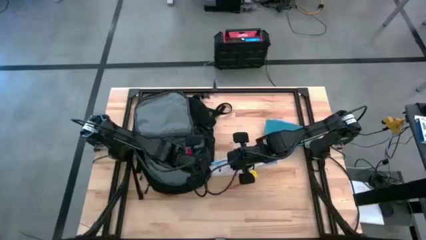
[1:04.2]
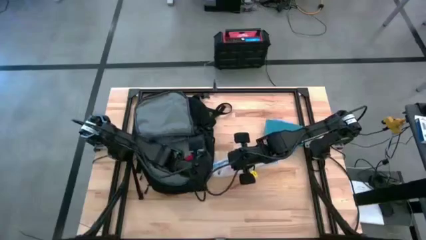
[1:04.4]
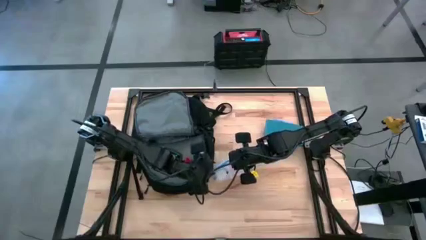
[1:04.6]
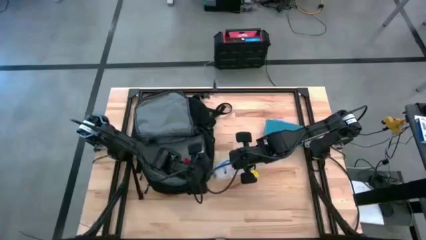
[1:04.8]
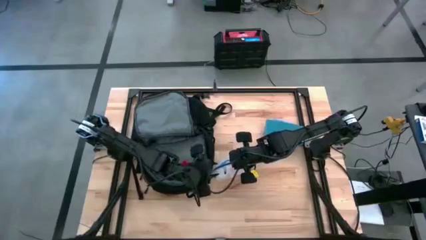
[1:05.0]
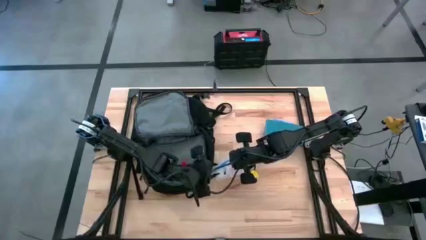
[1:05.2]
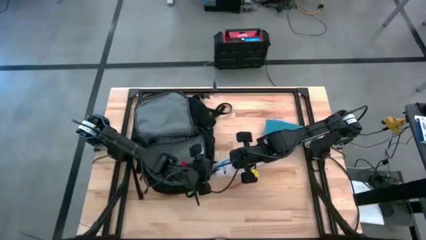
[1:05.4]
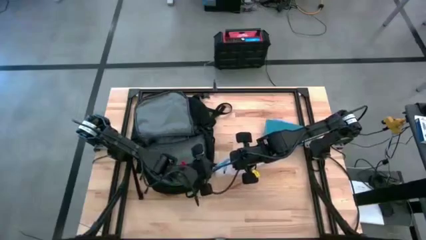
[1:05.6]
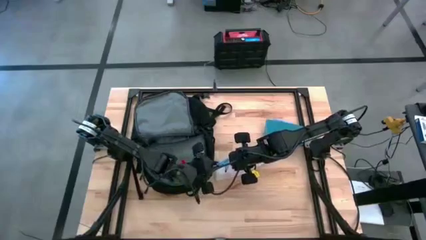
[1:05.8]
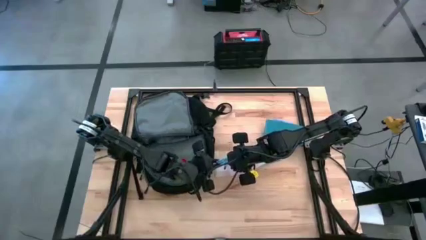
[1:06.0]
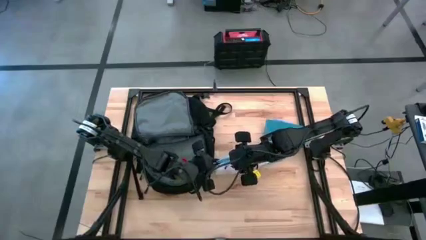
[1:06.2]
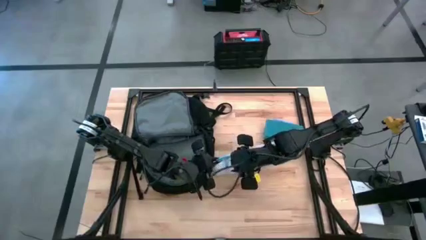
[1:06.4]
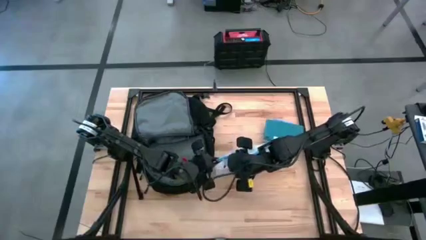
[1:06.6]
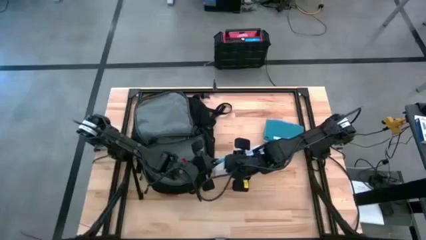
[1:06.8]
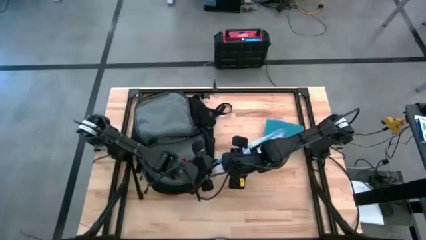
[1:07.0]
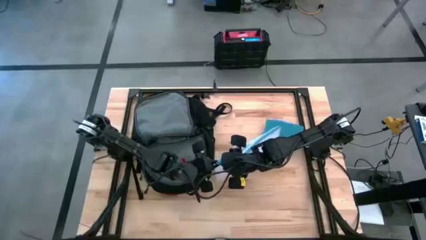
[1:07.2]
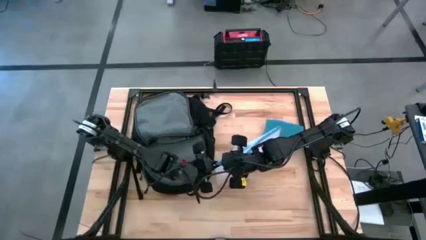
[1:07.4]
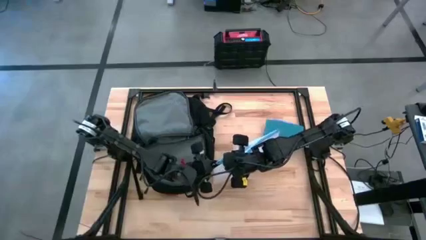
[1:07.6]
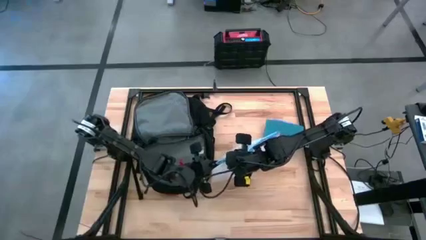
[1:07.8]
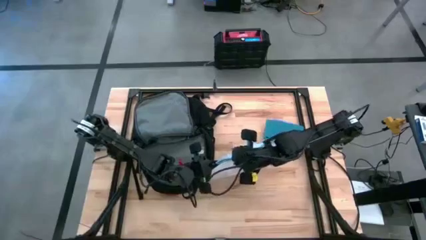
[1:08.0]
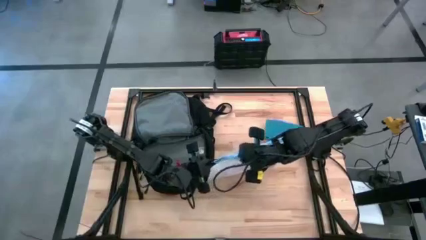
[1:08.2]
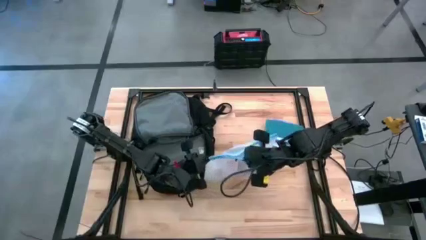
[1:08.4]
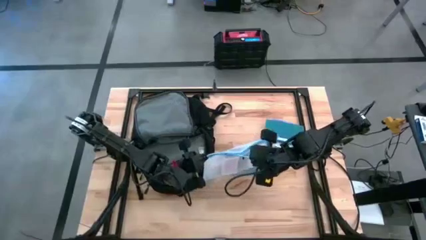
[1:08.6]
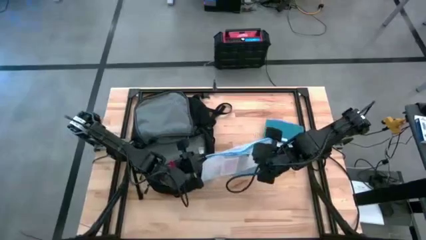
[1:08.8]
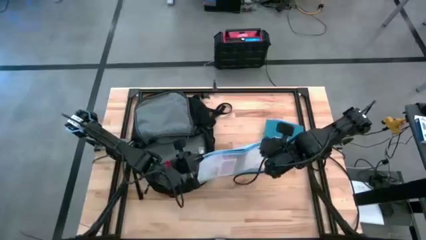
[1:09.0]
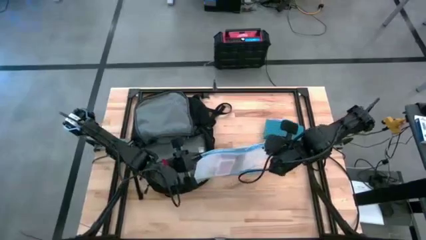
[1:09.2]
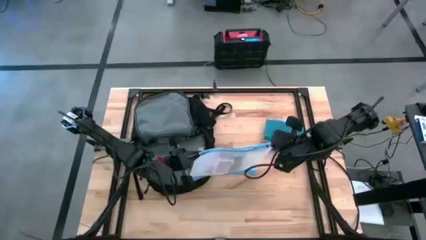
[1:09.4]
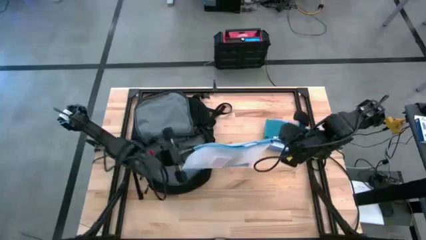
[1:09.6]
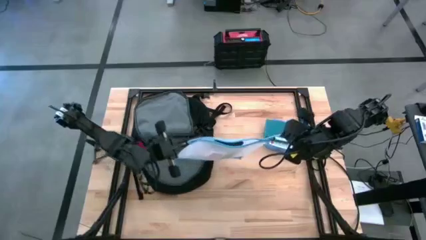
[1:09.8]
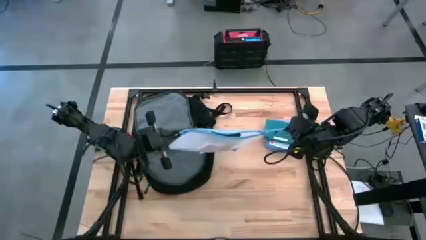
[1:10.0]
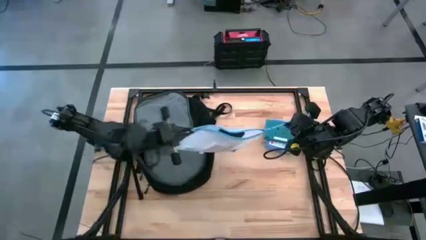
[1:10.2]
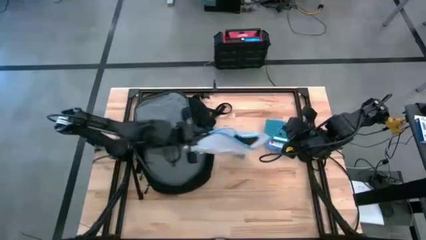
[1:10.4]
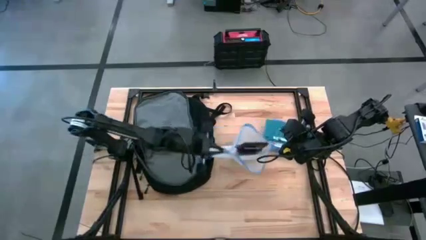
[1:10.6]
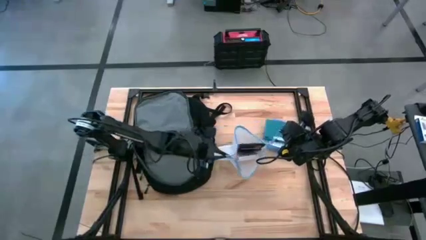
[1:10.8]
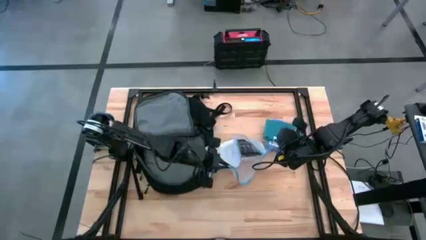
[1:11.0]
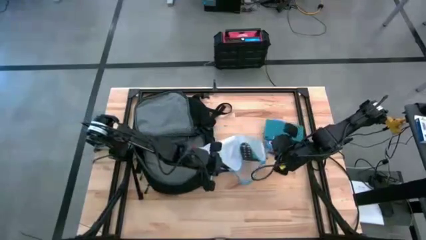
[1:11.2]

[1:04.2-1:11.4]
Task: Unpack backpack
Open the white mesh zipper pouch

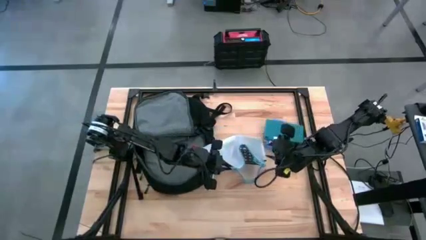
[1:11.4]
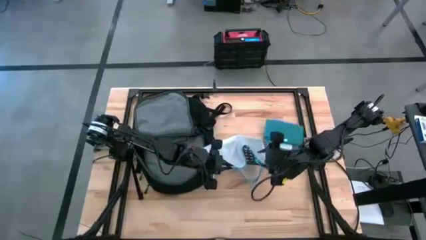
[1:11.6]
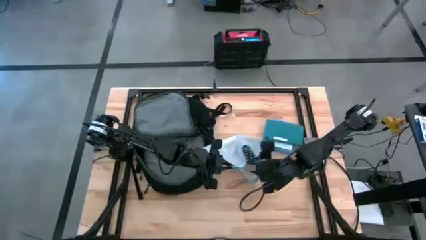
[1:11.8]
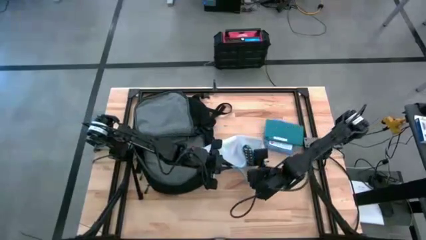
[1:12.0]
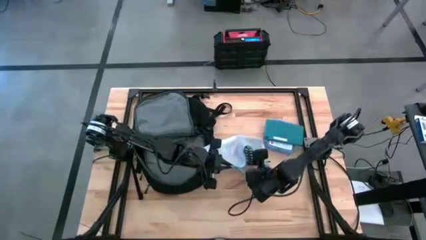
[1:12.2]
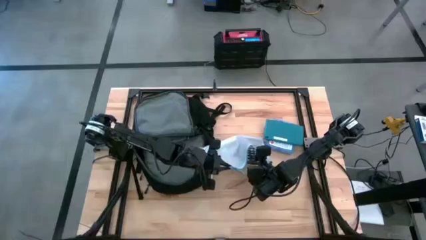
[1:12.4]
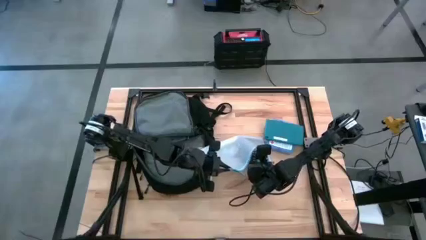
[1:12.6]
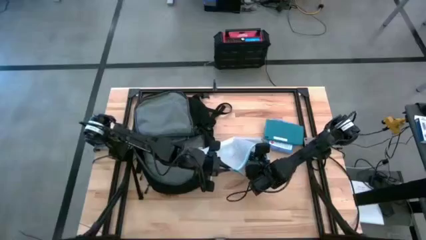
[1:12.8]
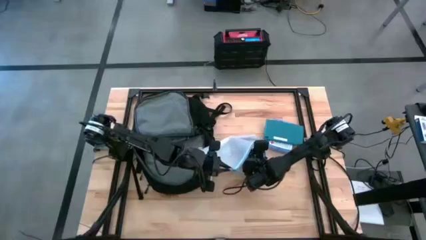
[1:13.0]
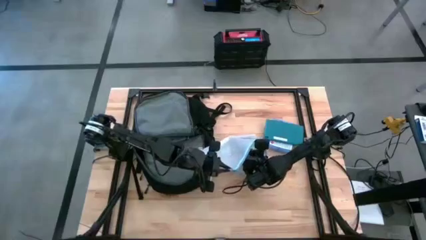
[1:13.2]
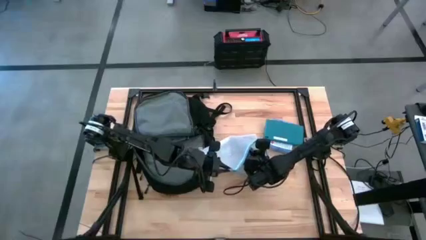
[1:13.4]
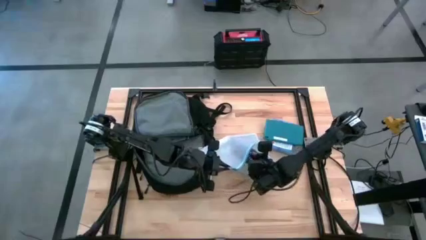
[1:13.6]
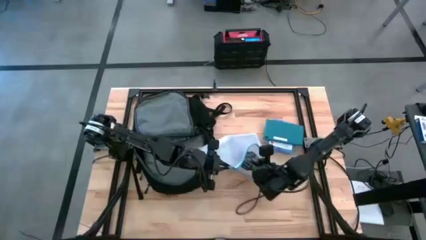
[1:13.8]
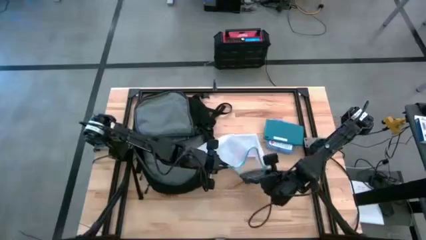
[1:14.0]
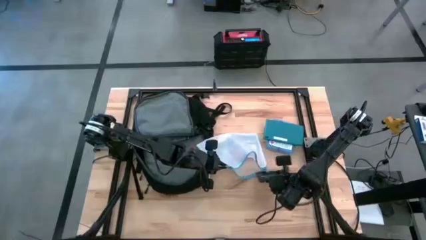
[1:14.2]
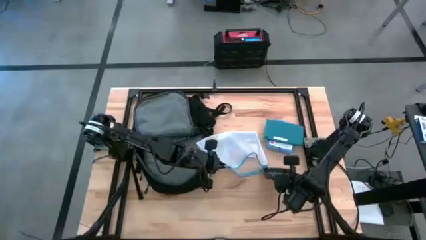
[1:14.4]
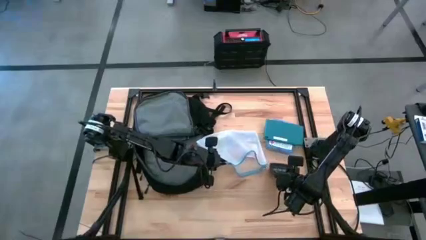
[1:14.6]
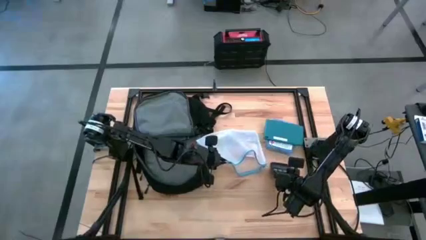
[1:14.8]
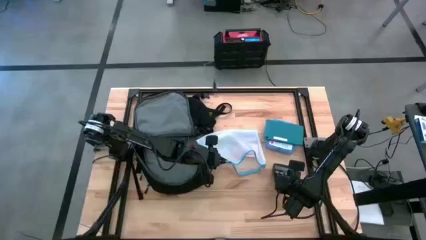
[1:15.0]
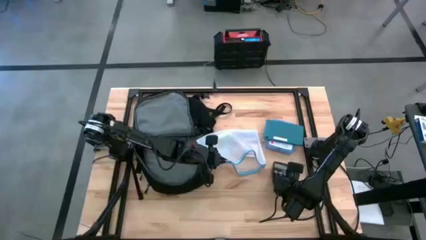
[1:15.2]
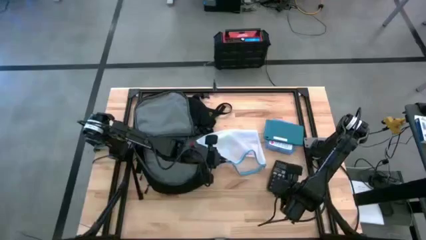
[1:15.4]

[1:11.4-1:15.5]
Remove the black calculator from the white mesh zipper pouch

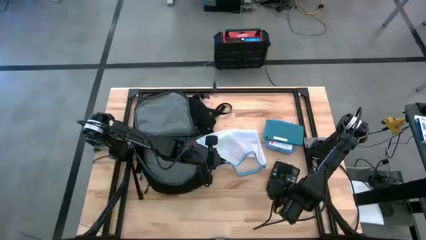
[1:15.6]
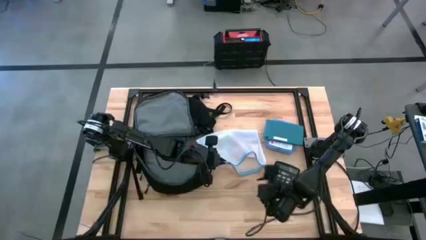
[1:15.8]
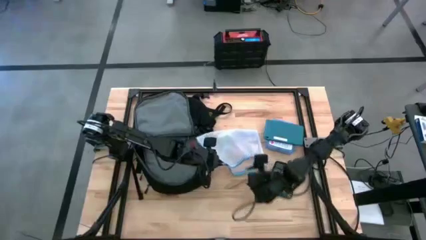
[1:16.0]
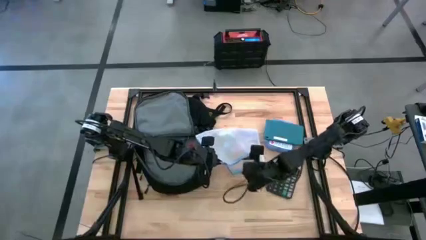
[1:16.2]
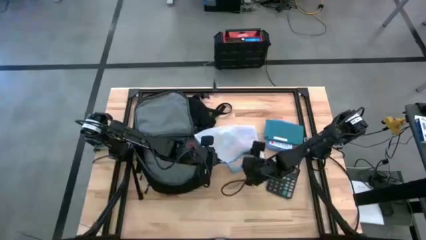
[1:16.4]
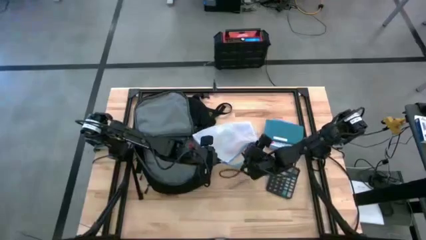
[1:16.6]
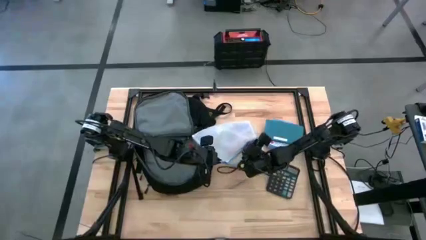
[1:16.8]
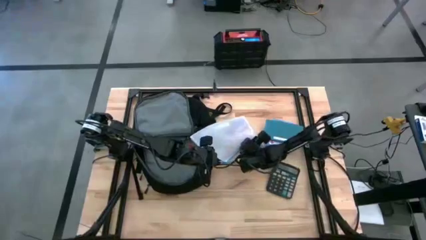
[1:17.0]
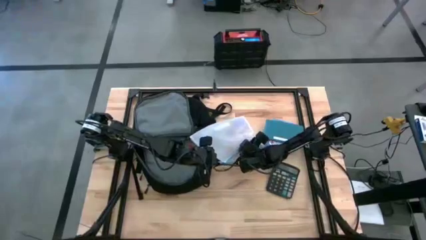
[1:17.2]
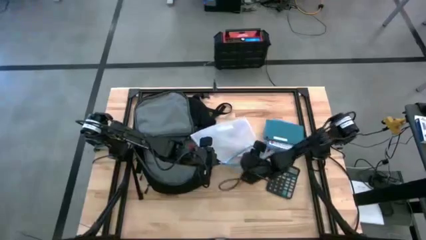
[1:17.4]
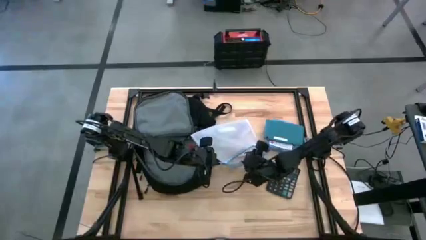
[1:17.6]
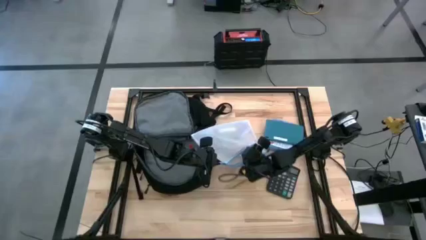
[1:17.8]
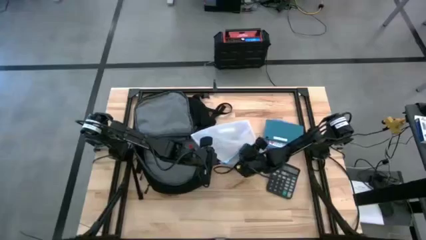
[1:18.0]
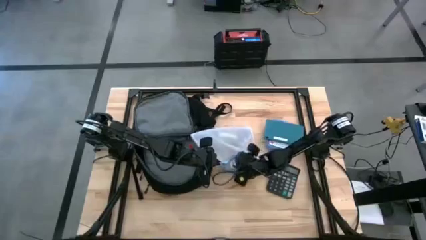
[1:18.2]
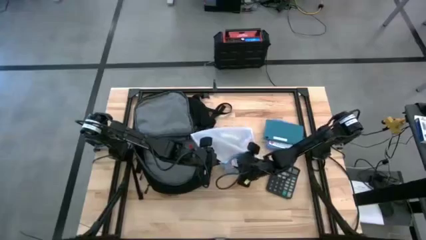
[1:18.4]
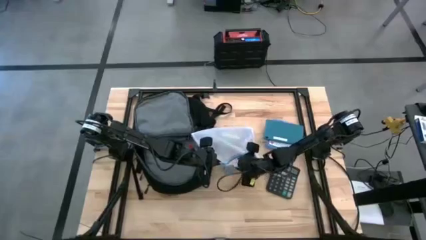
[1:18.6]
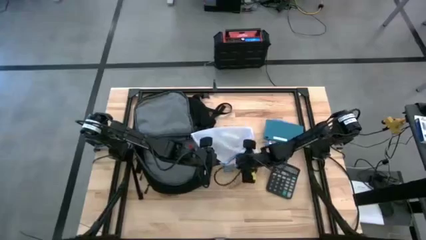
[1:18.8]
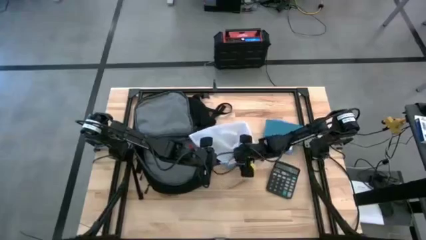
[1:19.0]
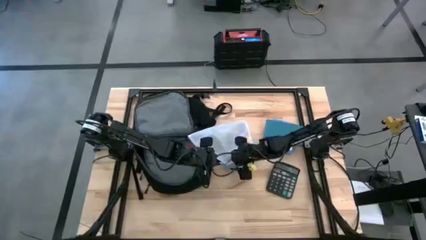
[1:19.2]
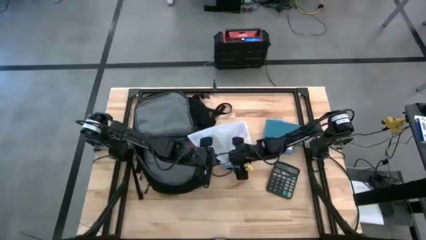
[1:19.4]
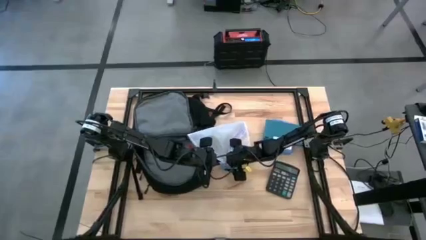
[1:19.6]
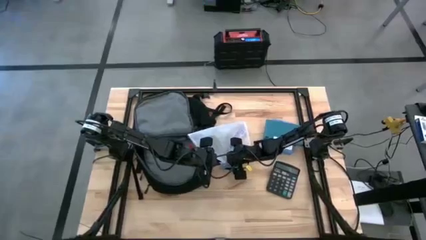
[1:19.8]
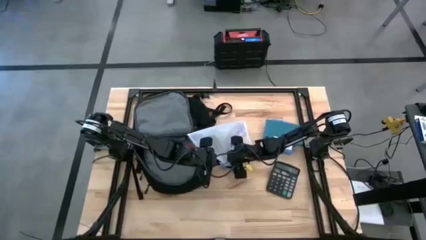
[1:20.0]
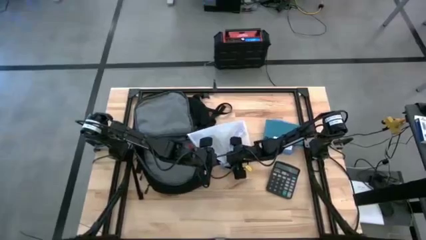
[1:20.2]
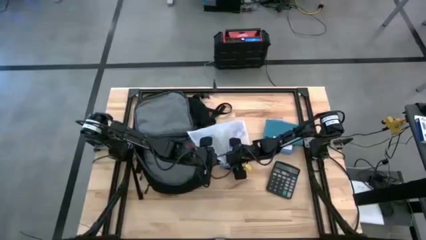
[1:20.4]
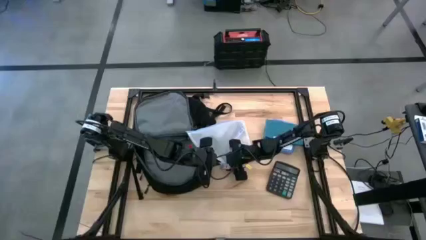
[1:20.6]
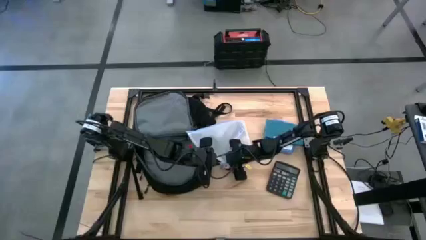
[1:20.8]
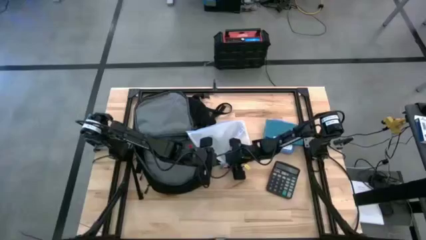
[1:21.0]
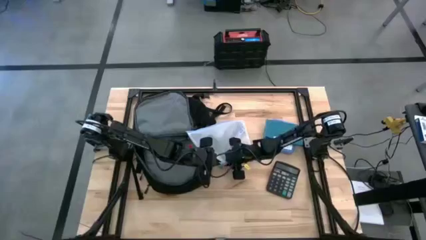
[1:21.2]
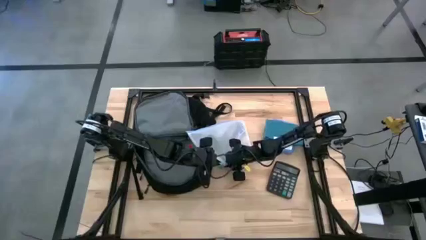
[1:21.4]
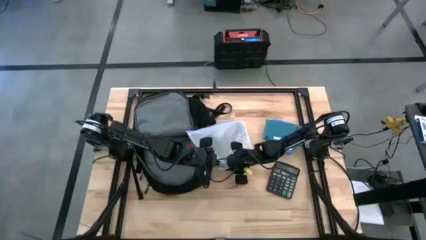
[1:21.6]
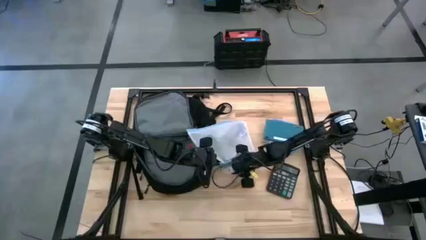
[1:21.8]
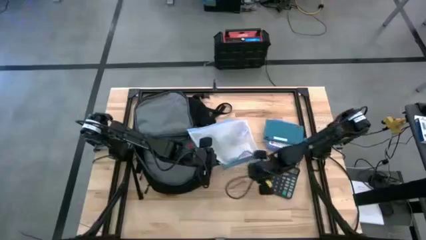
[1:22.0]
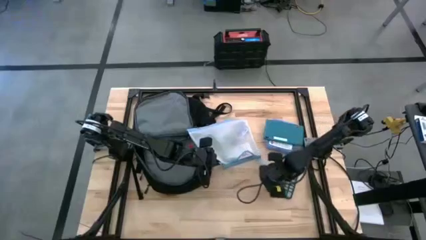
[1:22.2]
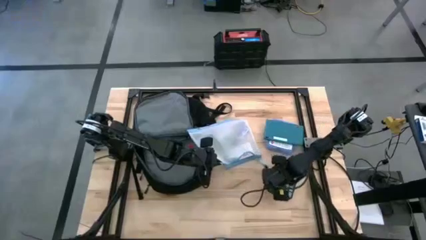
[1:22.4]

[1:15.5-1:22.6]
Remove the pink charger adapter from the white zipper pouch
